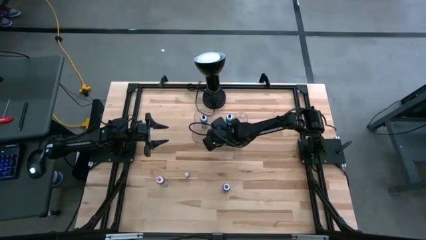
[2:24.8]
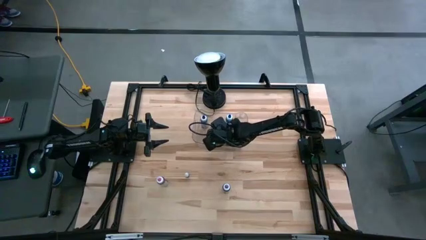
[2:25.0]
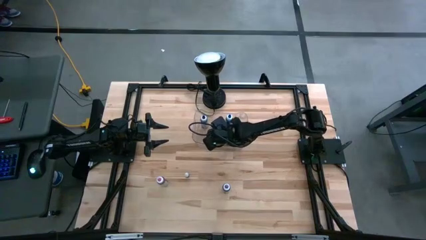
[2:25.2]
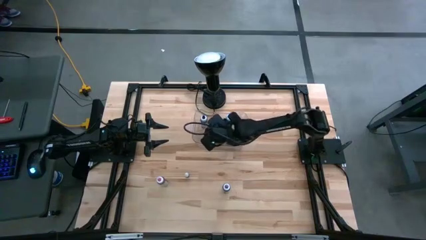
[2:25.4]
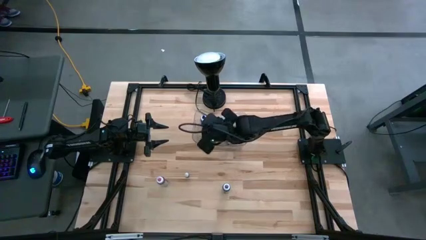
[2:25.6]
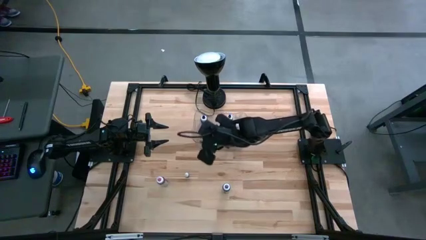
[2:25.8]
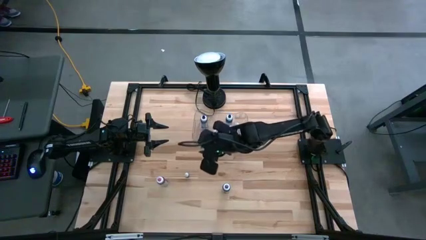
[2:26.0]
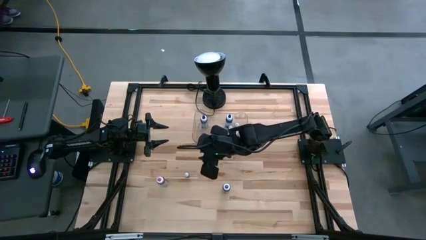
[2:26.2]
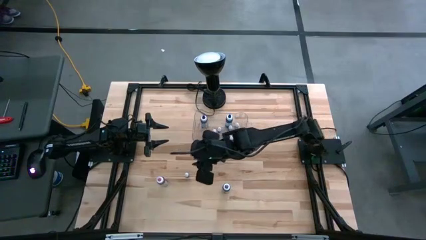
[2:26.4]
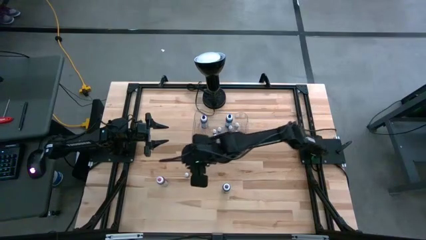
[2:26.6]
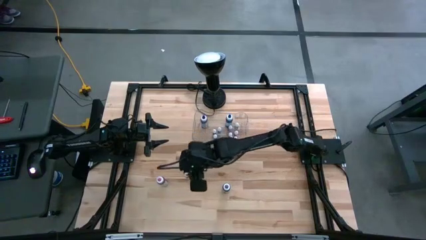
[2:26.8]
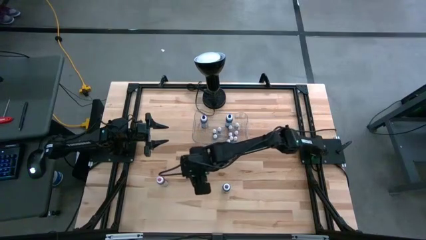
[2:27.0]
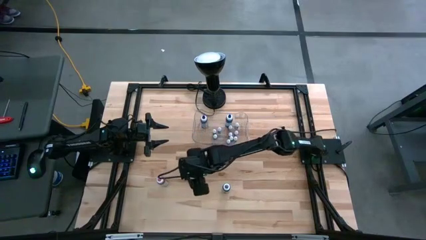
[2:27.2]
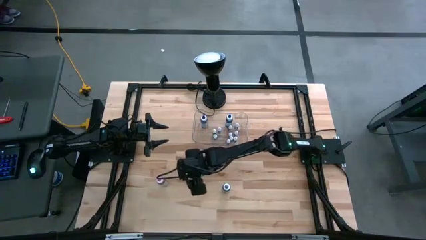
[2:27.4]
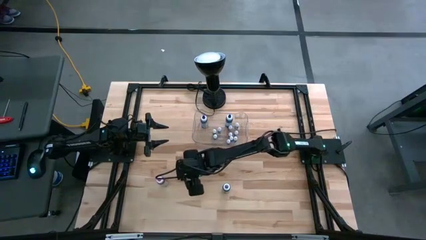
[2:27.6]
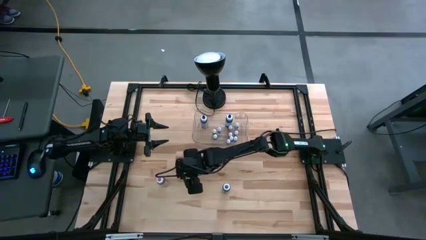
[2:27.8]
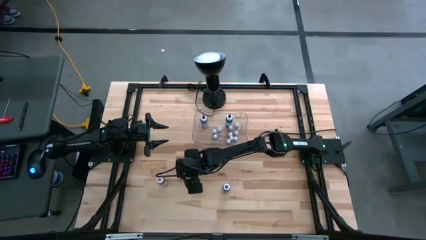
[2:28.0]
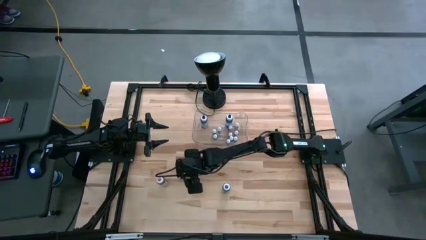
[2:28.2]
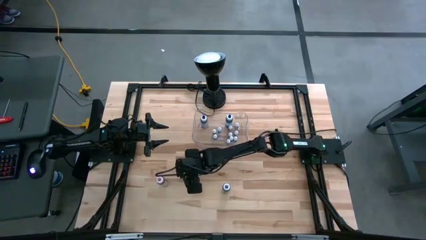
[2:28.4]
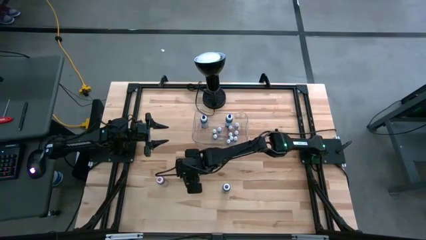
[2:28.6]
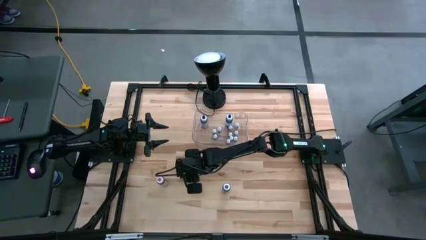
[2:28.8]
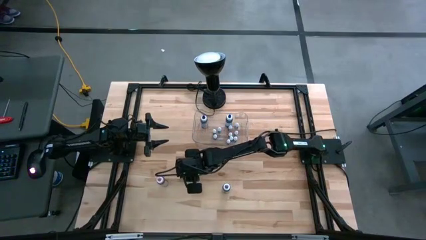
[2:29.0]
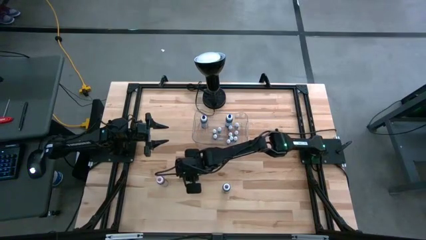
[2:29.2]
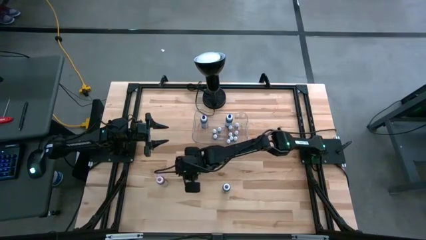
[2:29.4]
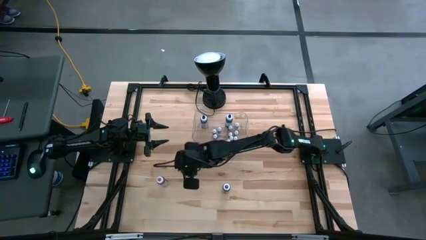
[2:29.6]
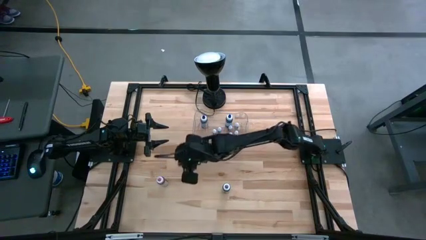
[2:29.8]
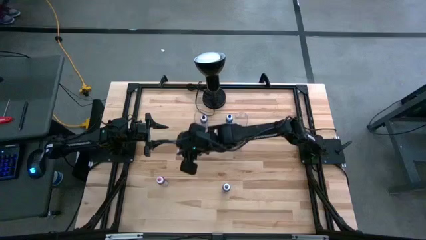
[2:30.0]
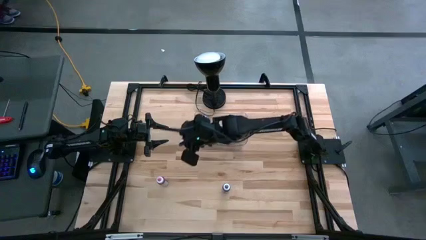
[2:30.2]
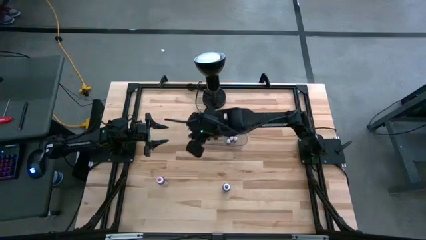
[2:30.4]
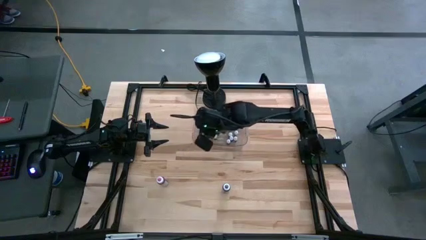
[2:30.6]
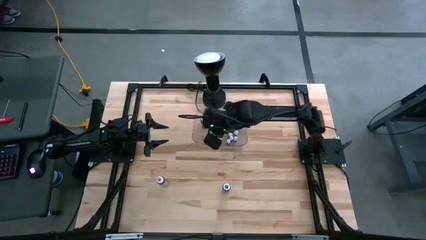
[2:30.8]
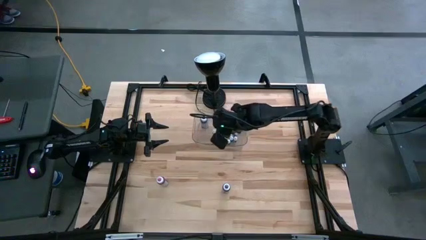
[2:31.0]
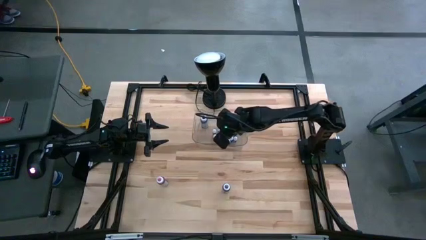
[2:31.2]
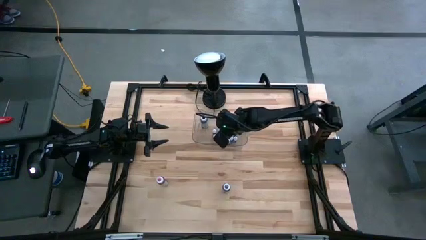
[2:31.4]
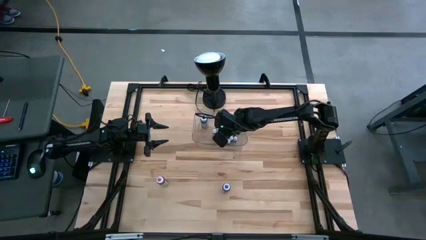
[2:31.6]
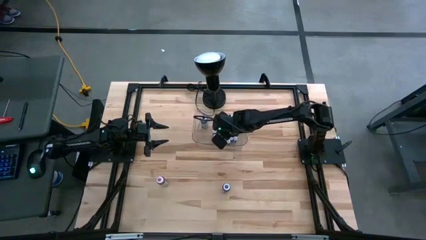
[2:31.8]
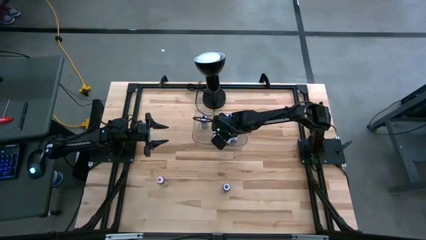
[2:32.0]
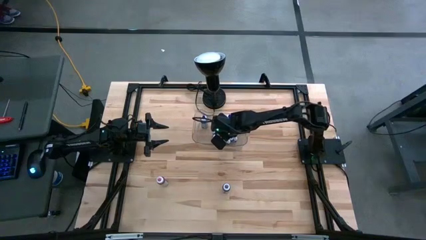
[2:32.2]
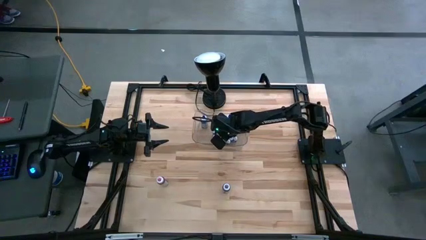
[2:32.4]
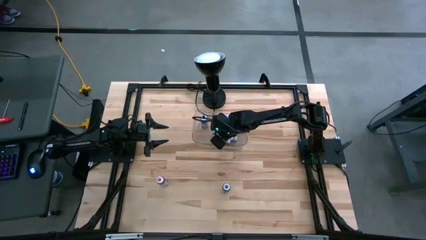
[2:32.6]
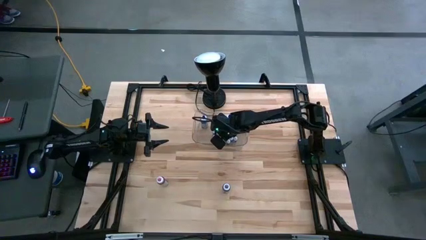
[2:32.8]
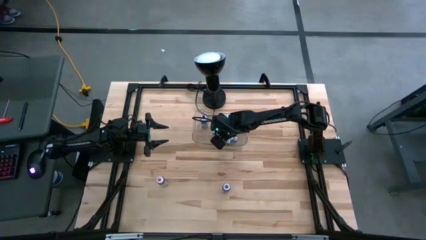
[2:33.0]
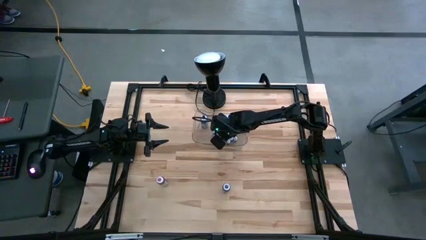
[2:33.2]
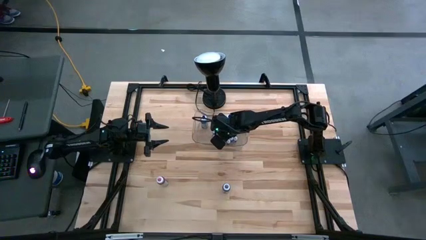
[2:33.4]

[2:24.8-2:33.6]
Task: Pick & Place food coloring
Put the orange food coloring bottle into the transparent bin

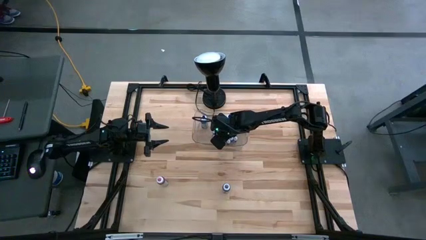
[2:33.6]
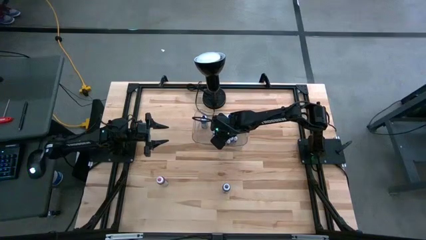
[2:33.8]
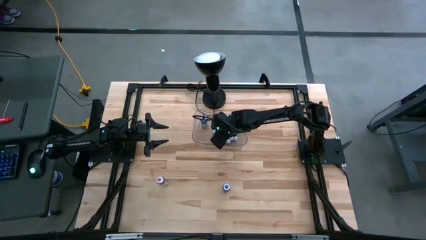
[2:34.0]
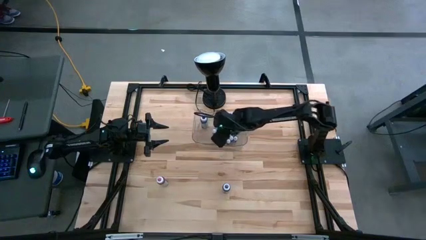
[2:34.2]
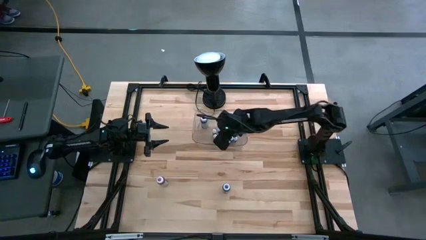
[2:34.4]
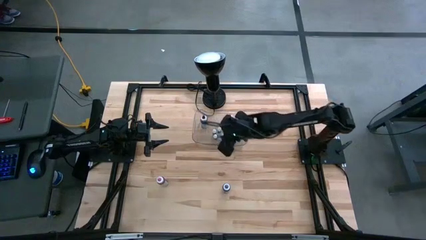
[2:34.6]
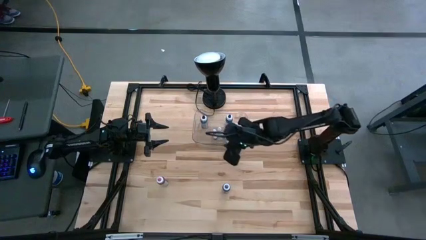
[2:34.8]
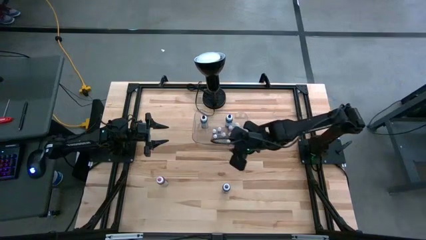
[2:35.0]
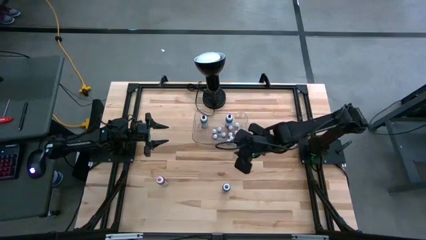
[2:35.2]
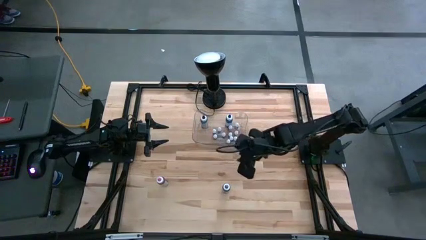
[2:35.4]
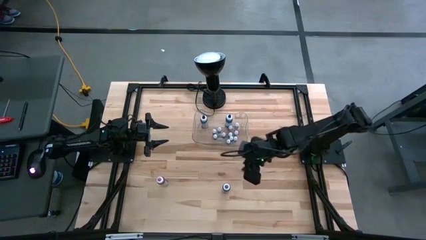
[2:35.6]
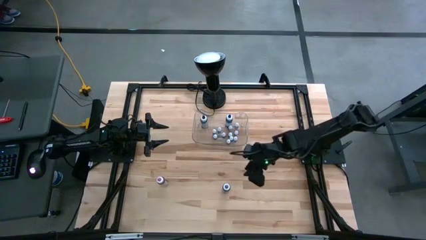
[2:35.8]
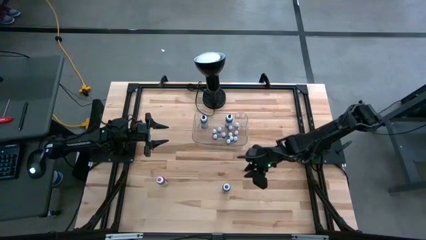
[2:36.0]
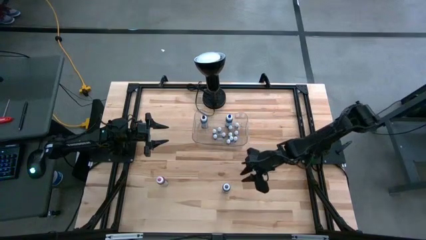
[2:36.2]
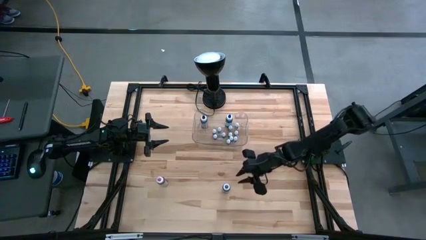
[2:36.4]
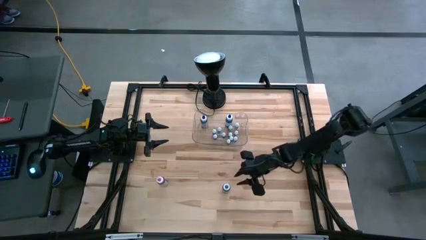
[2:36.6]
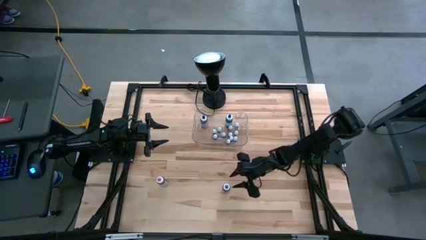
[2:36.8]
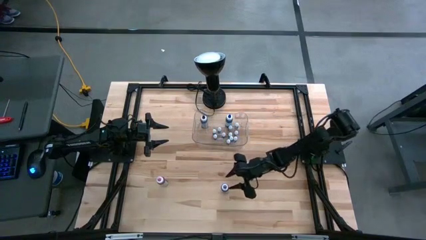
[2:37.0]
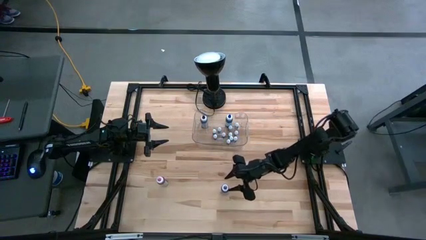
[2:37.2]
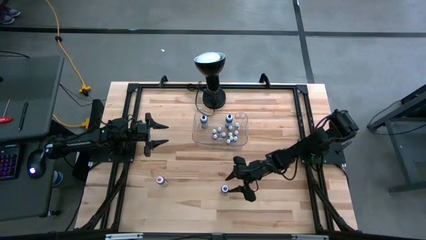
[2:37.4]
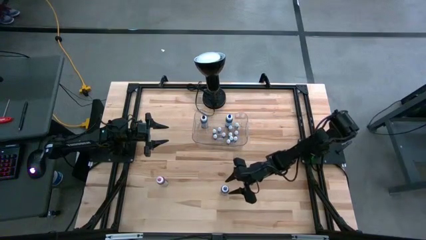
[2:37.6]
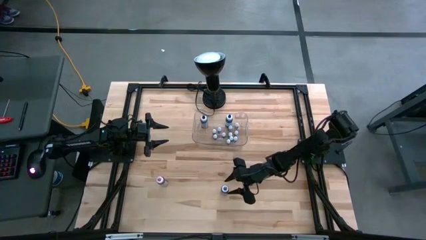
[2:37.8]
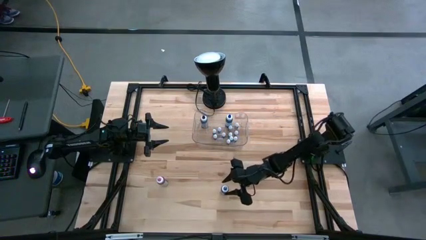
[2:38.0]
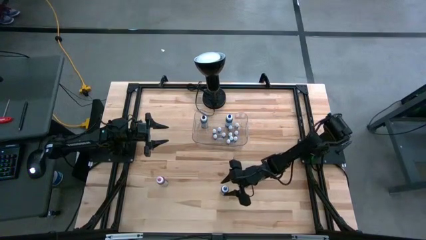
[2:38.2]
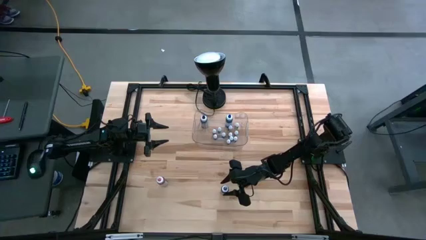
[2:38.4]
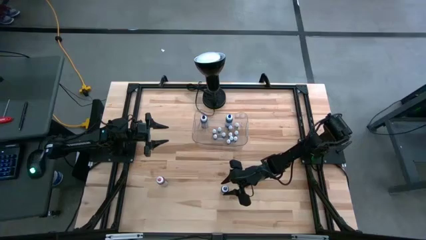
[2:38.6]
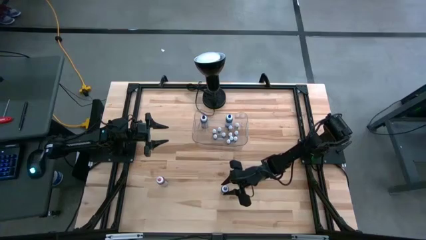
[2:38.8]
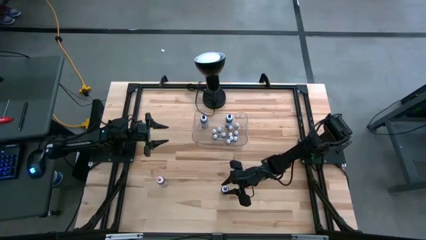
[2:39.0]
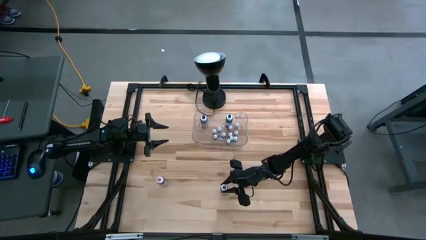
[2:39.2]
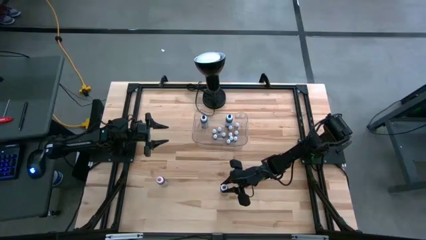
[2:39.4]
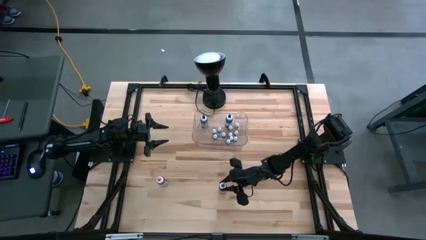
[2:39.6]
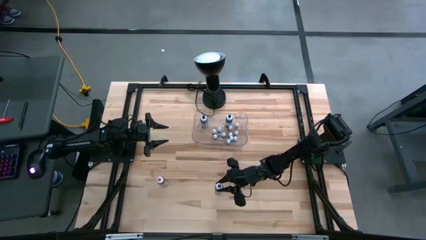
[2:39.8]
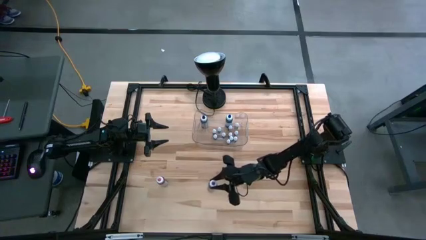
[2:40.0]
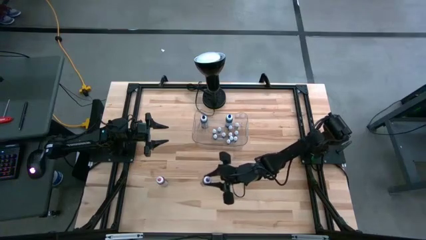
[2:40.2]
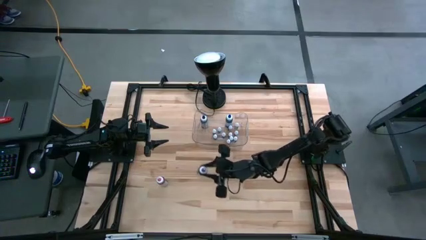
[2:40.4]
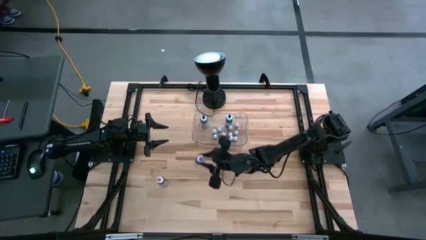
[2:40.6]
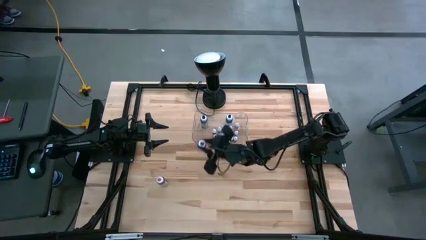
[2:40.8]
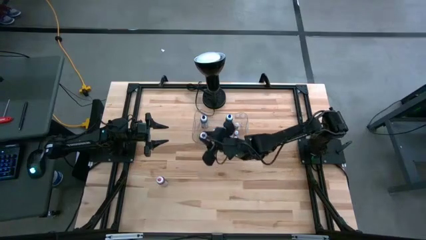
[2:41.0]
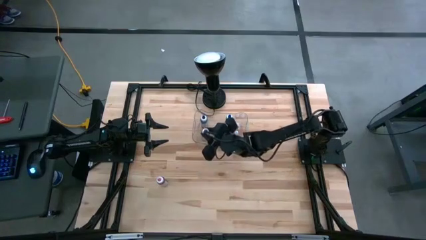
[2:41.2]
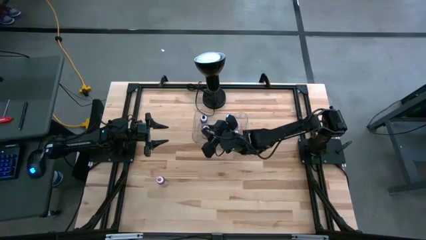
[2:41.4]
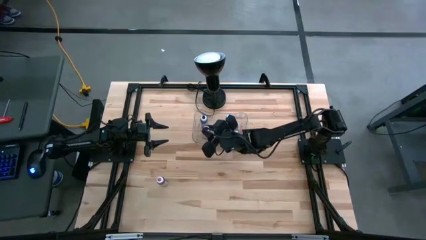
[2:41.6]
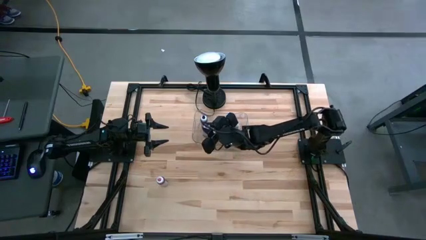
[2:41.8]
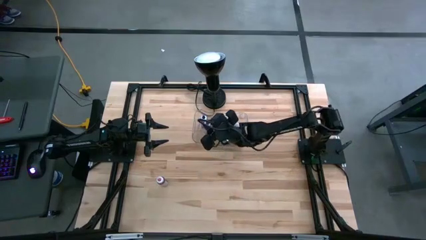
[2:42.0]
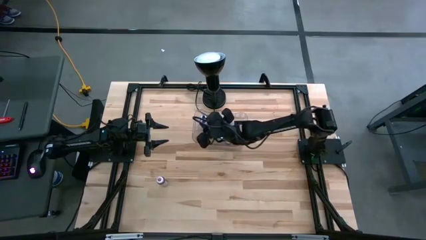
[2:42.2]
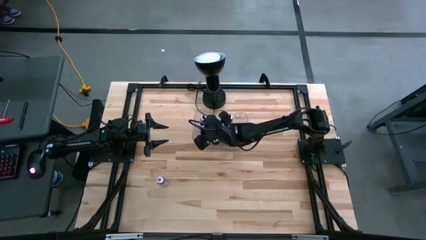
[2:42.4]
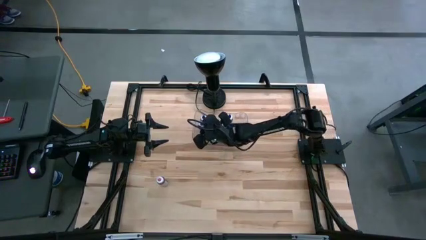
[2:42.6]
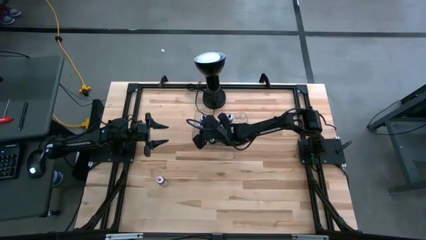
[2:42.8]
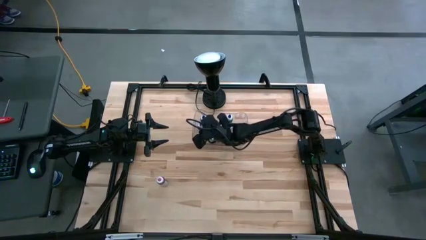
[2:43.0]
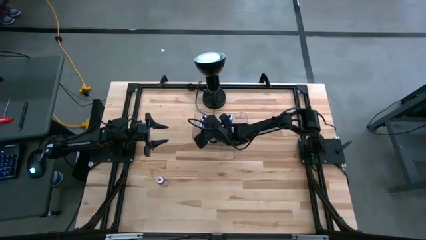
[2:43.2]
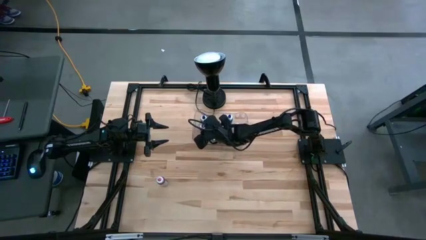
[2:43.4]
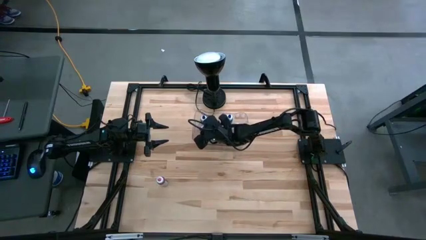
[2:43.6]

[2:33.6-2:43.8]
Put the large purple food coloring bottle into the transparent bin
